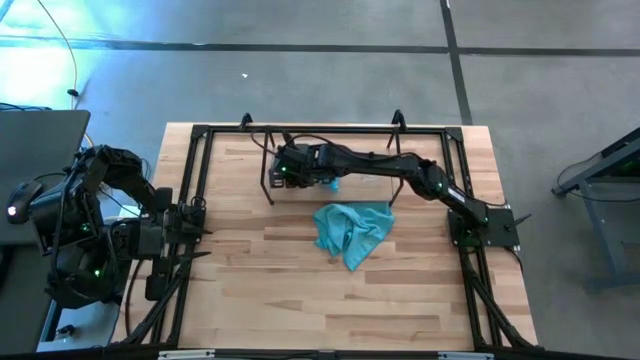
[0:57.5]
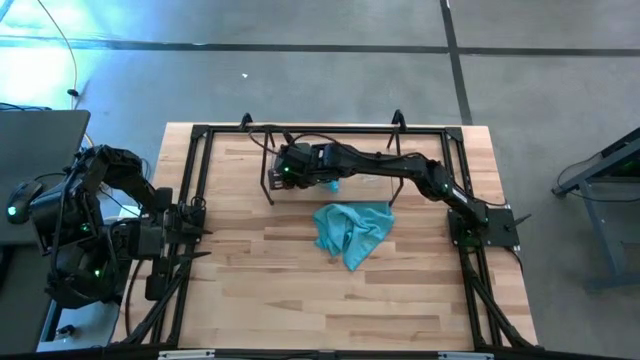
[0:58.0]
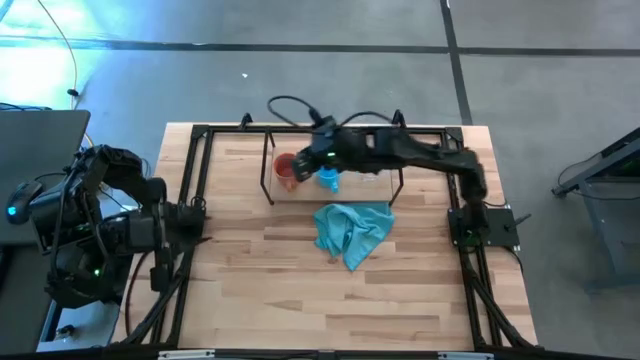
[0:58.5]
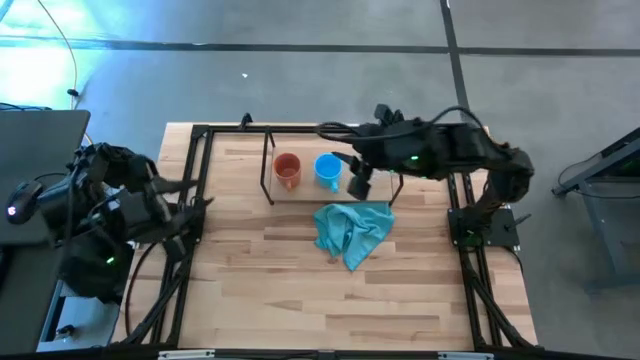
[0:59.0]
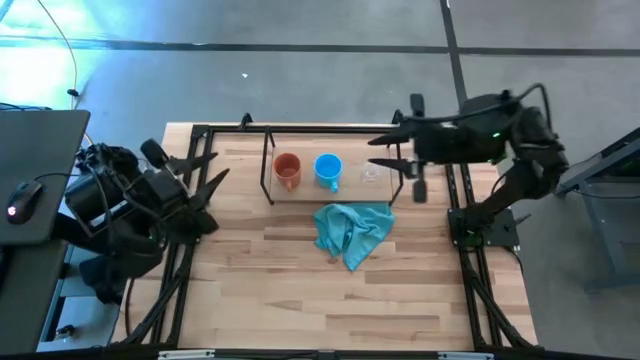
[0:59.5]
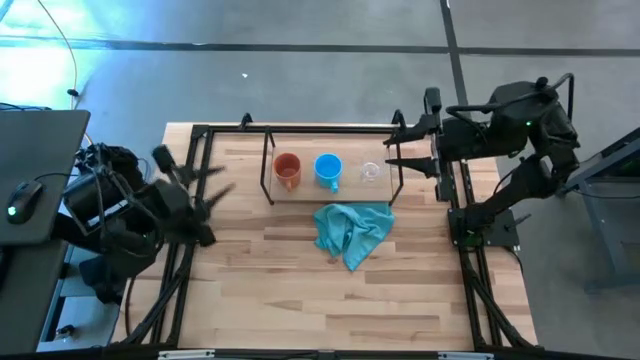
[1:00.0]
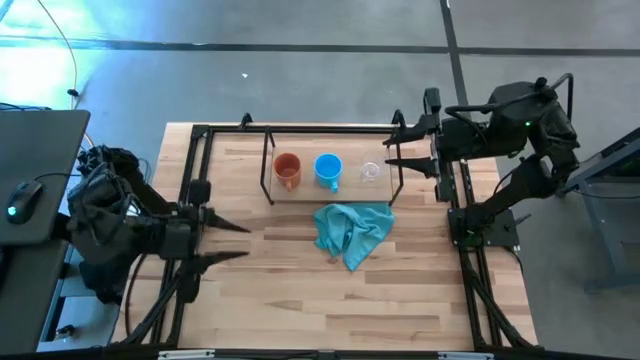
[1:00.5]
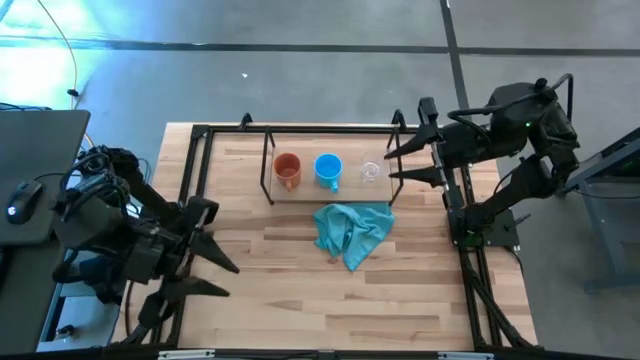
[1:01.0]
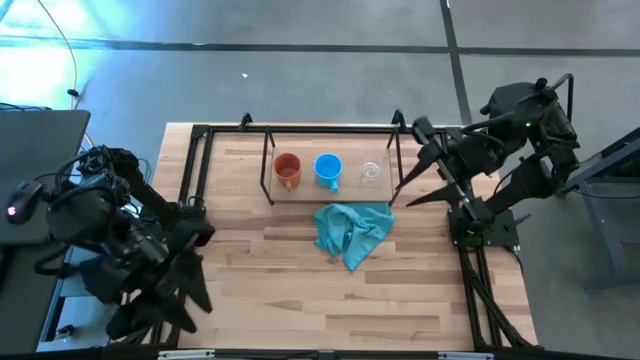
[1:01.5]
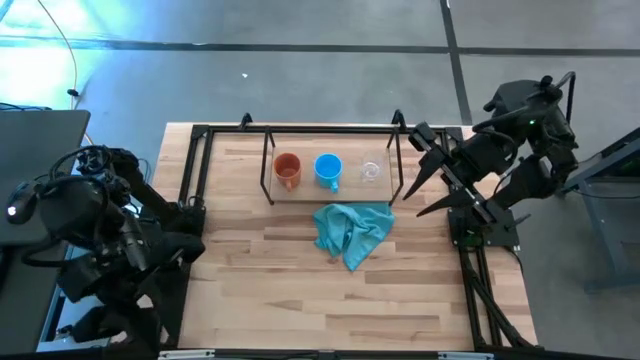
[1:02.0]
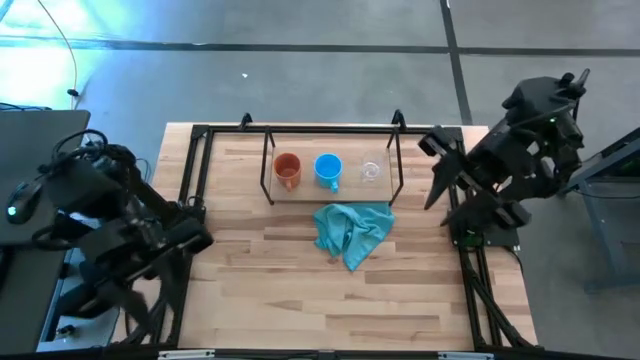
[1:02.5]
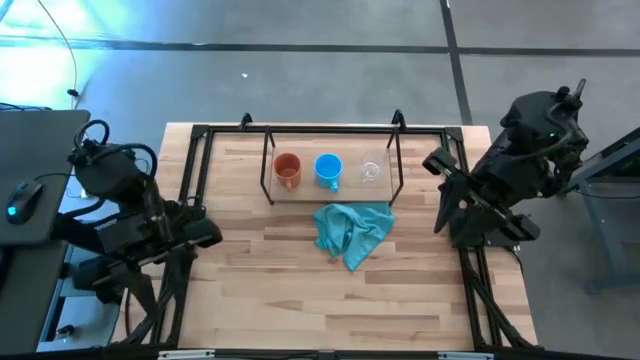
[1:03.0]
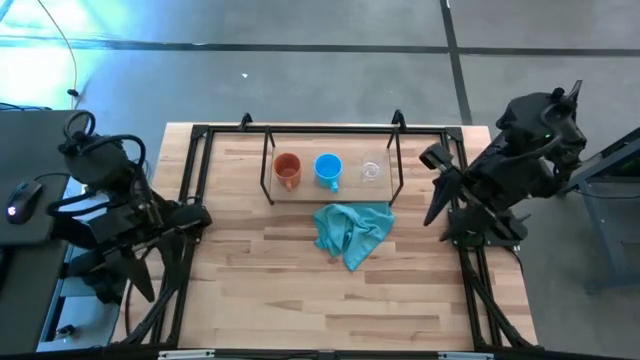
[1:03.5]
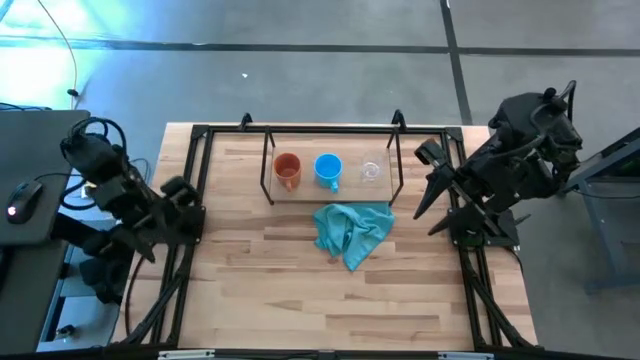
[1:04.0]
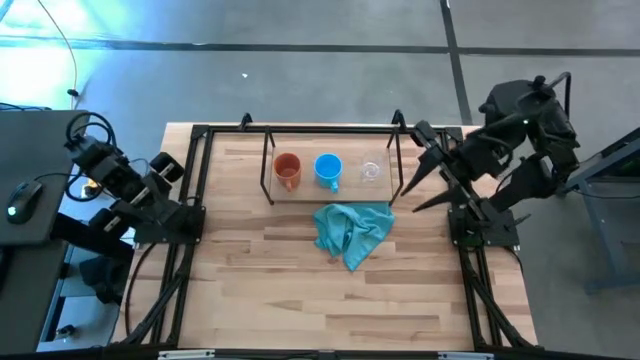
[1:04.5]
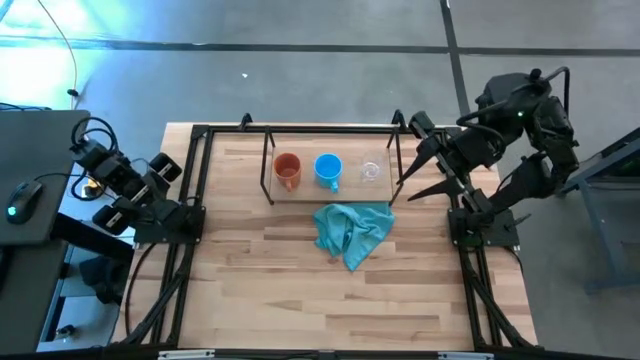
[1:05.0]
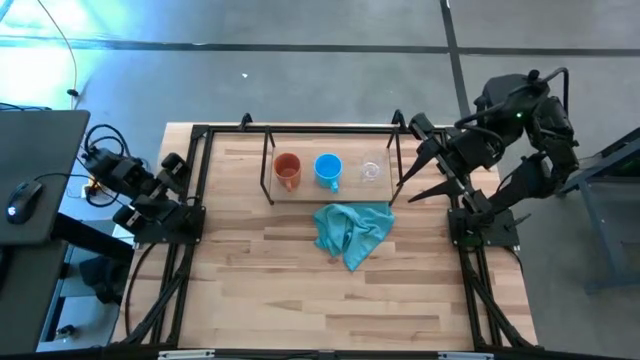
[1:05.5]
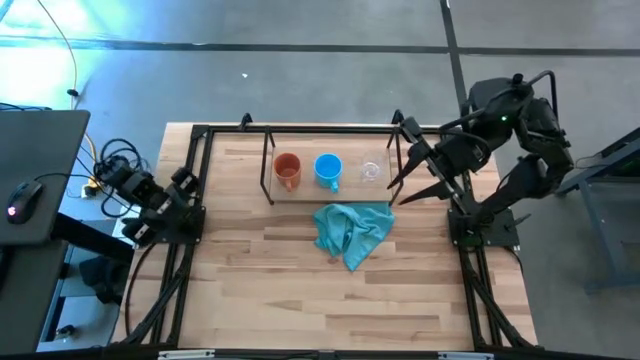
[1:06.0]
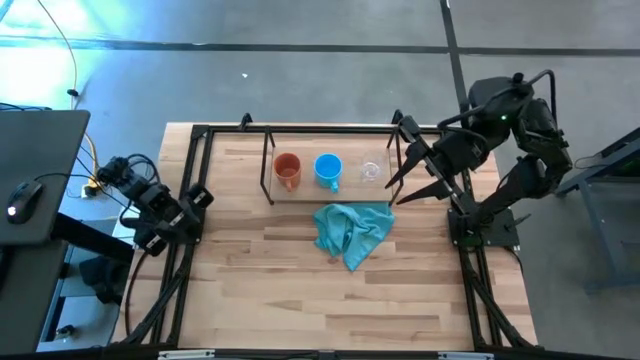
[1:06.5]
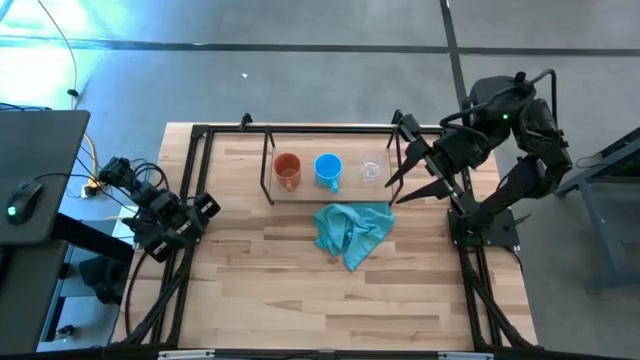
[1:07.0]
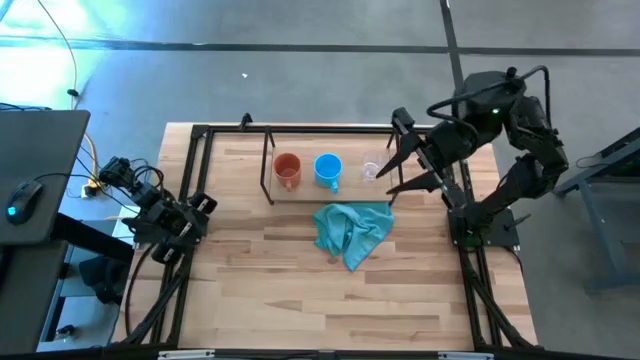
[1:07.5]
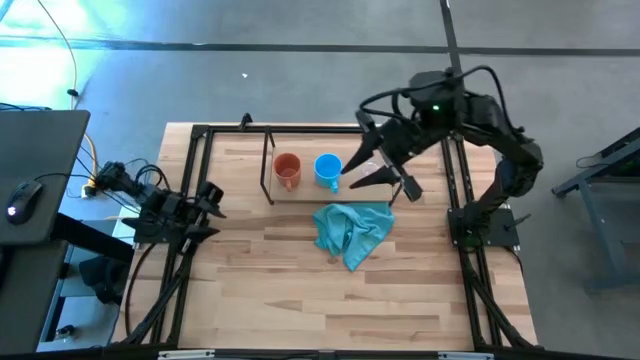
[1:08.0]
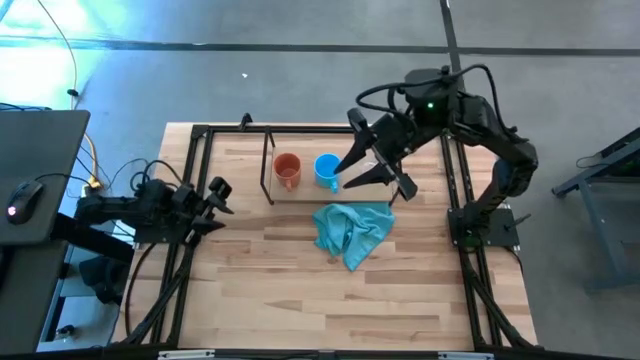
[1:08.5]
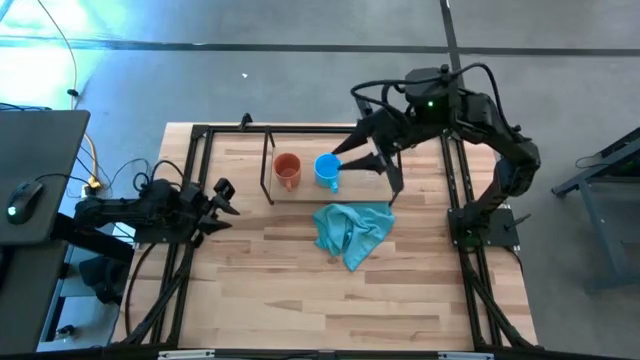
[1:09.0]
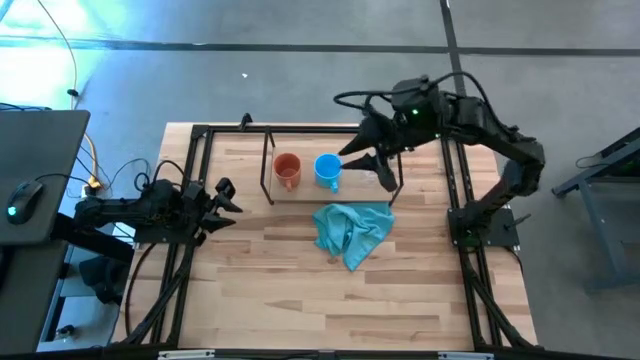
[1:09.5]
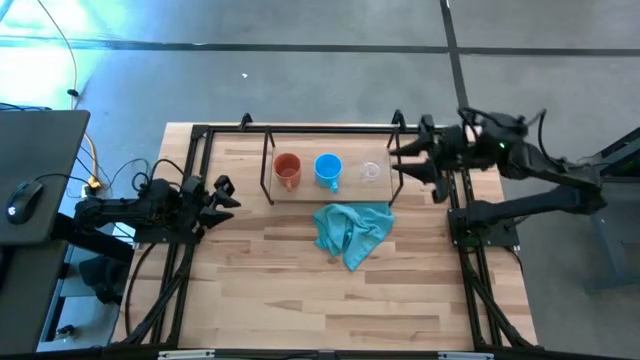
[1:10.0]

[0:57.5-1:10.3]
Task: Stack small to large cups/mugs on shelf
Return to Home Position

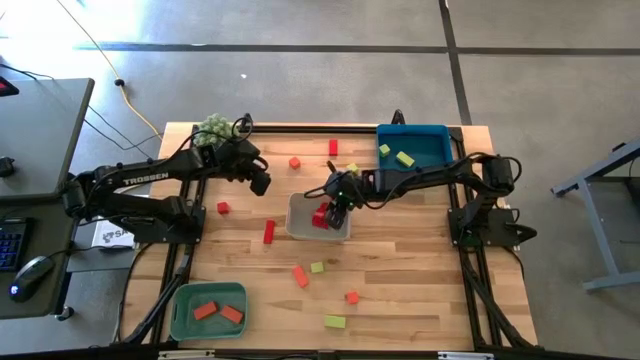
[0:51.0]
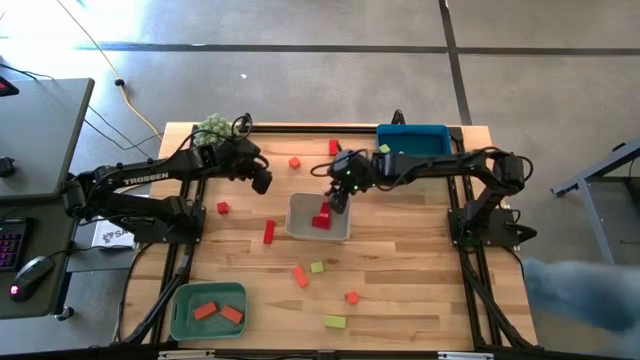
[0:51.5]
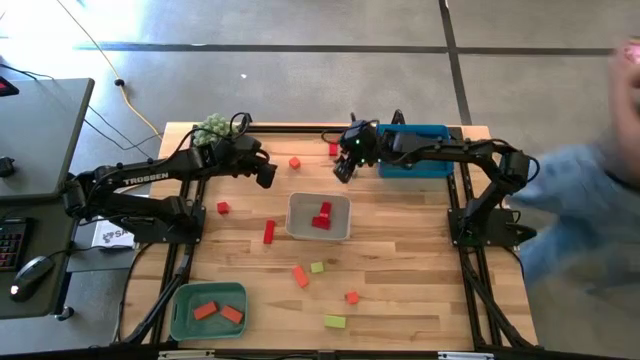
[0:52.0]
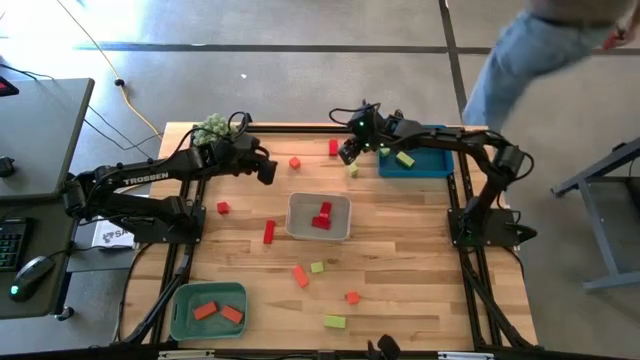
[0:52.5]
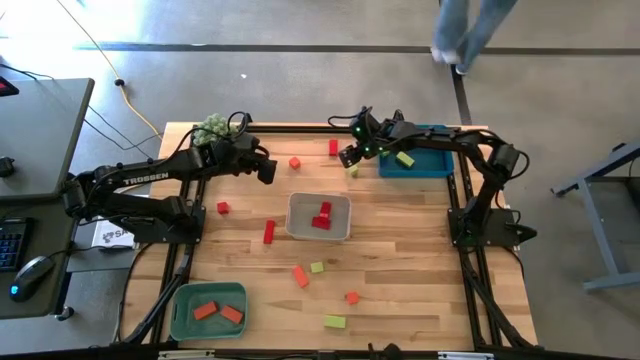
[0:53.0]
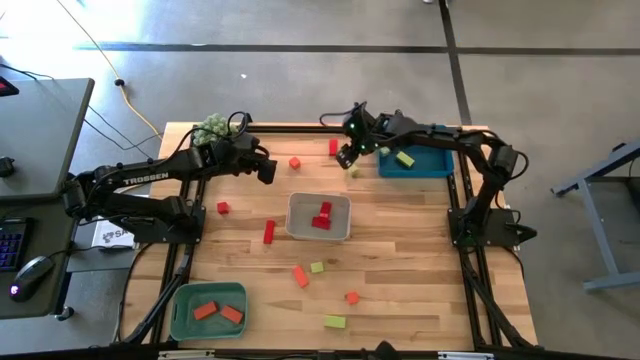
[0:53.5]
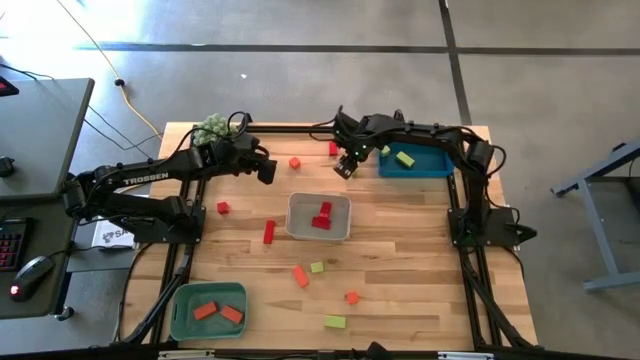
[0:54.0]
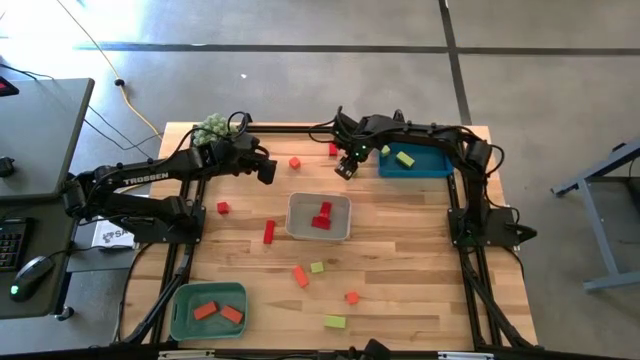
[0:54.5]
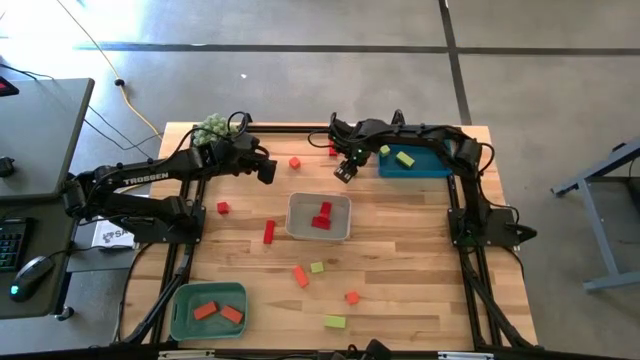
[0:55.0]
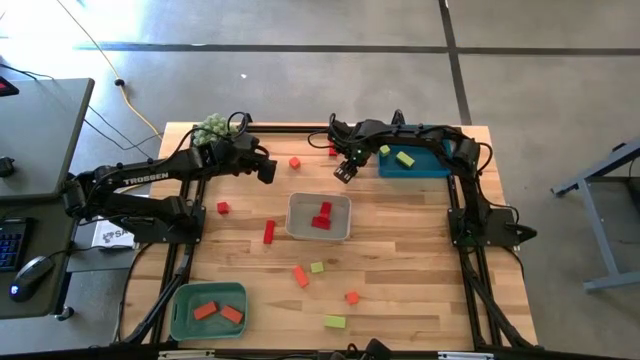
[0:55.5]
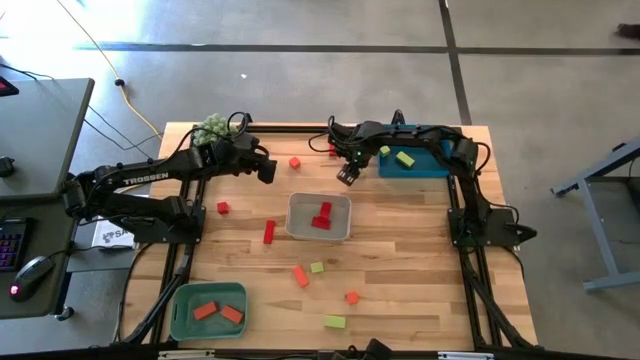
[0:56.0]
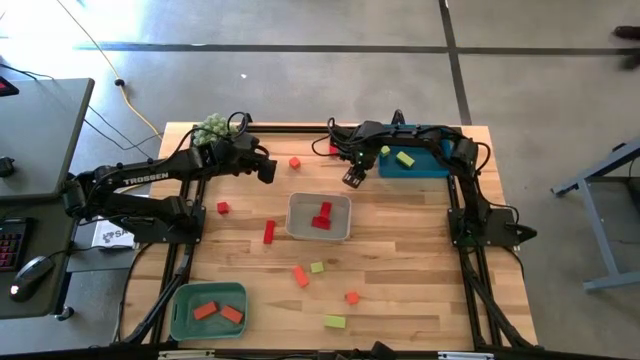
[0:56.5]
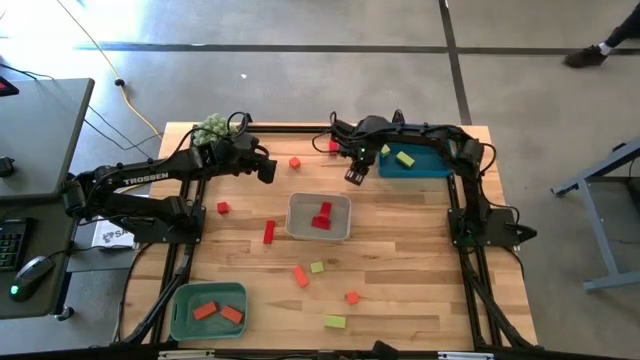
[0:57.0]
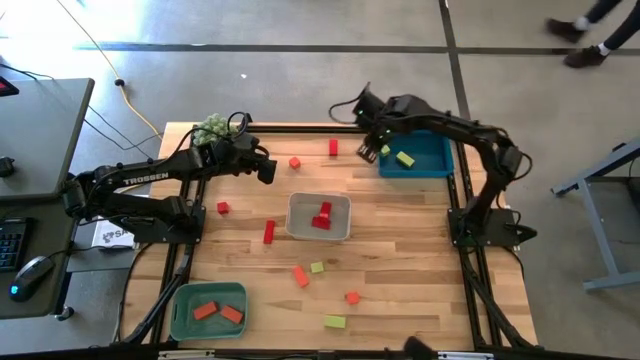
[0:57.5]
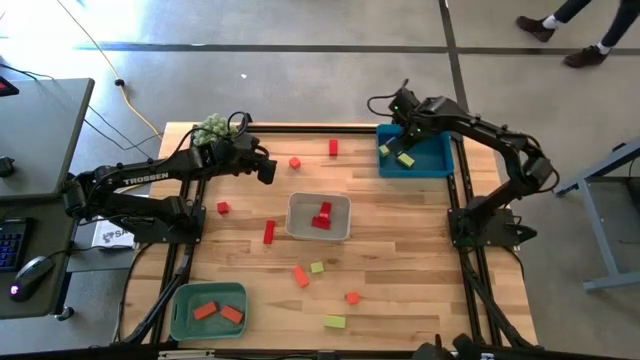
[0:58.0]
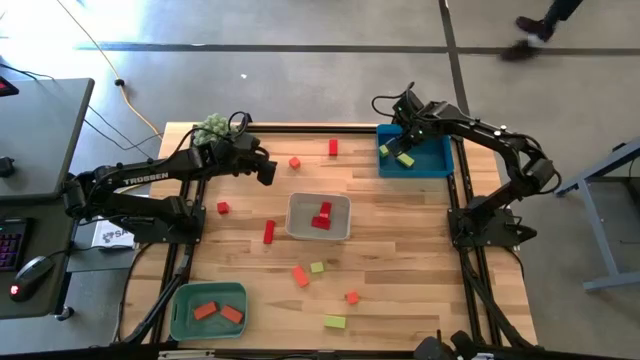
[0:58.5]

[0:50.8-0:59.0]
Task: Sort & place blocks by color
Put the green wooden block into the blue bin
